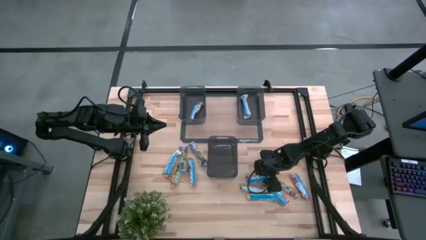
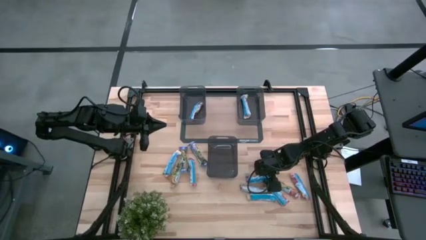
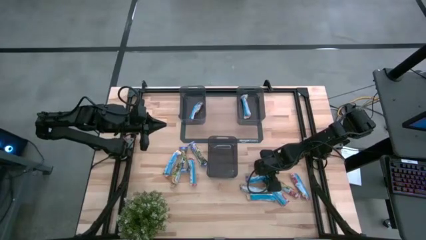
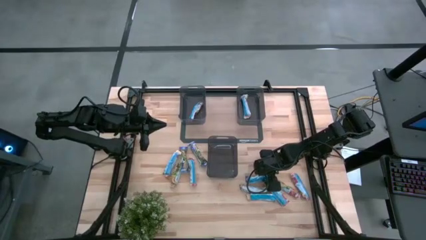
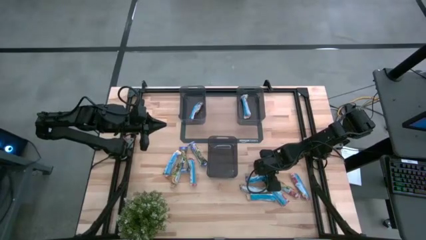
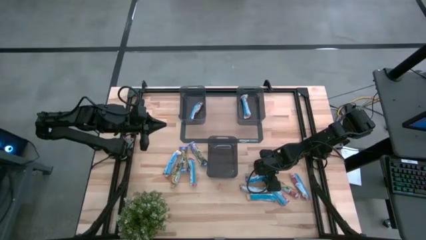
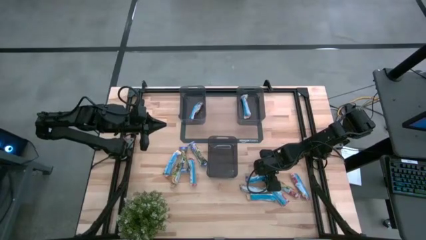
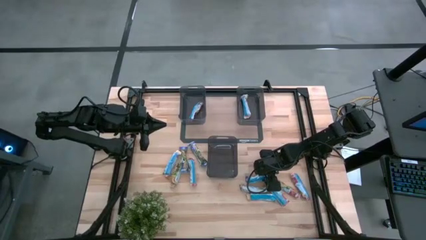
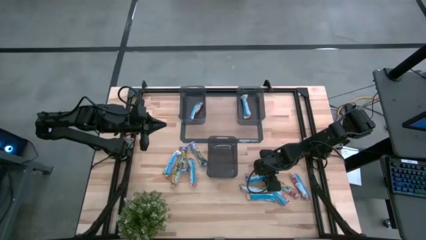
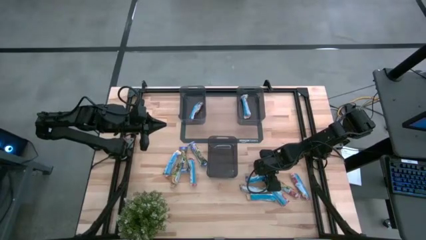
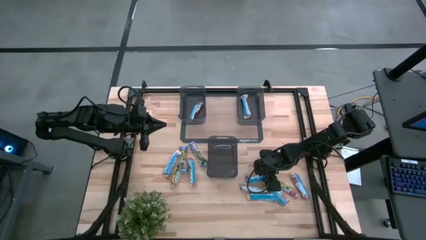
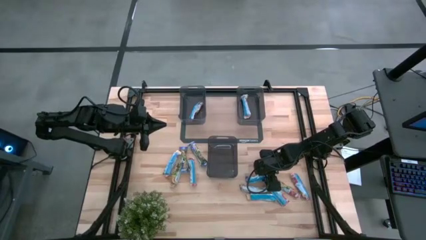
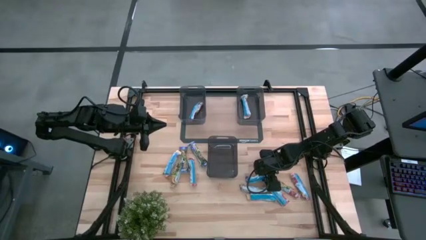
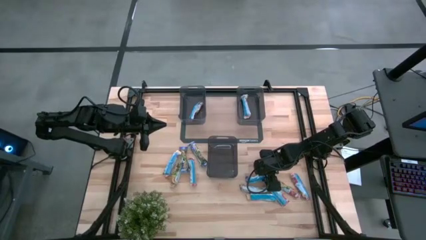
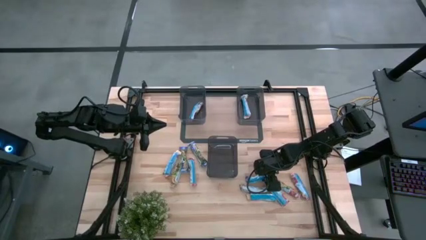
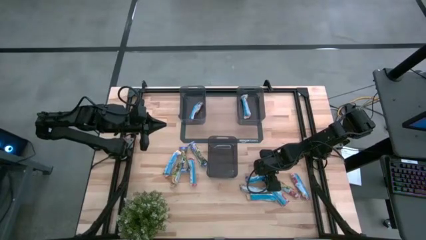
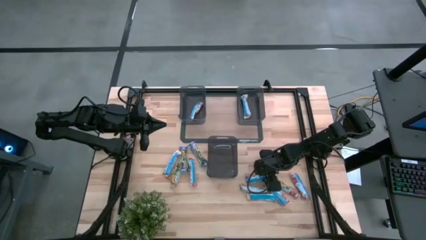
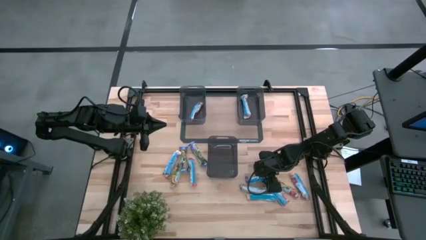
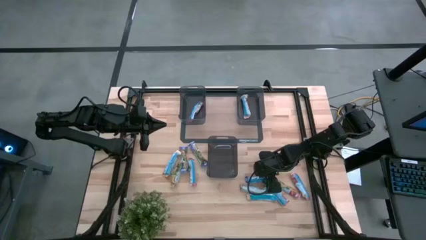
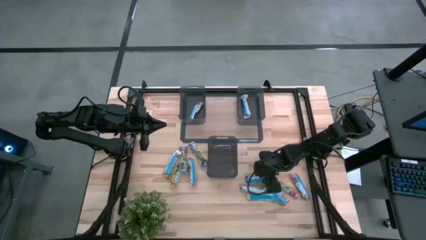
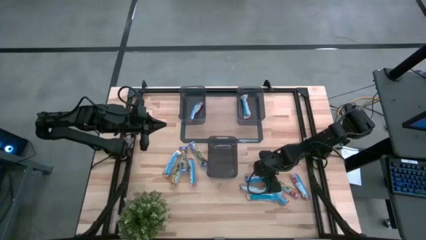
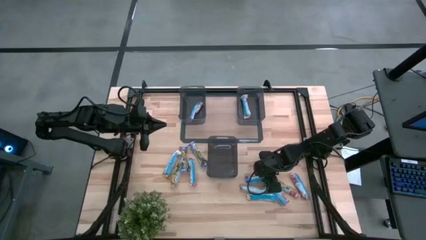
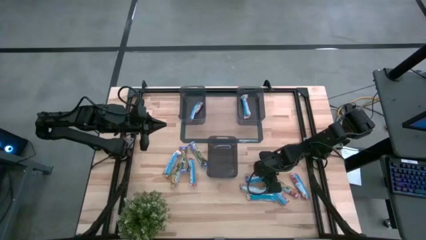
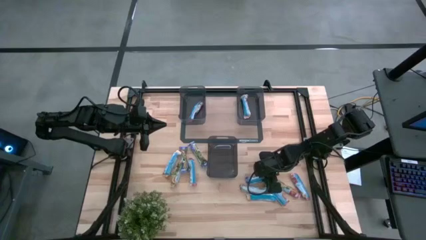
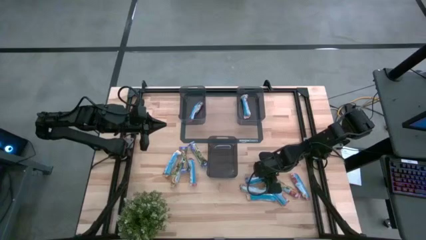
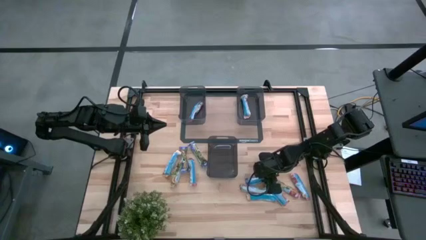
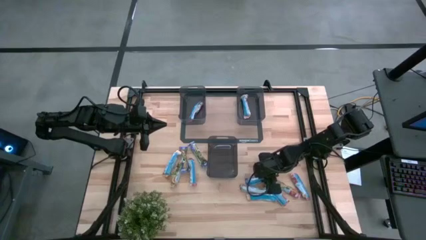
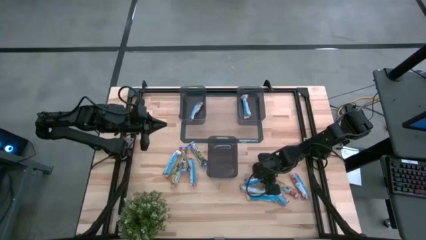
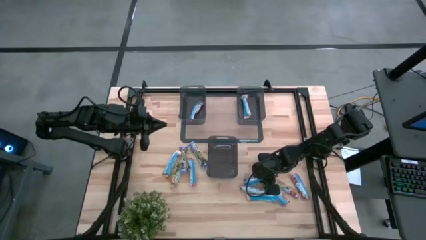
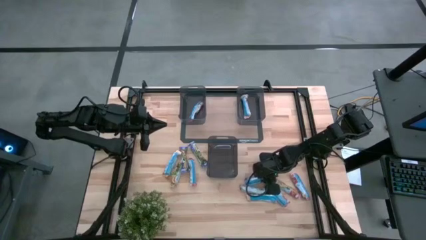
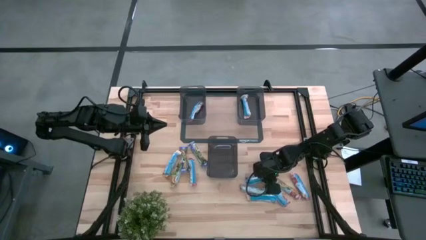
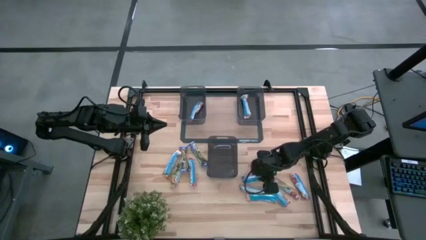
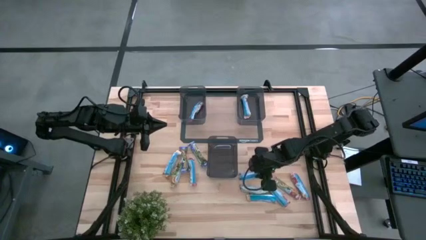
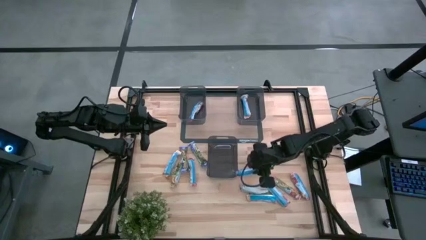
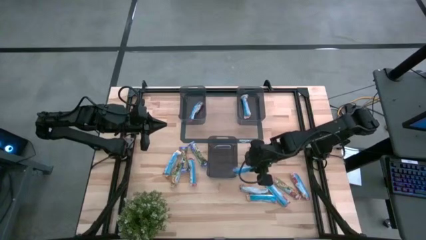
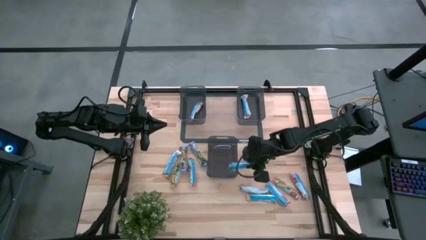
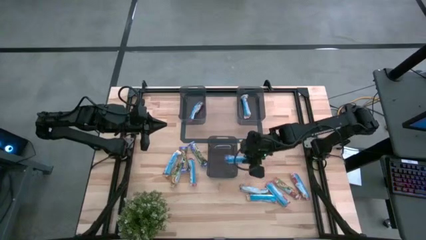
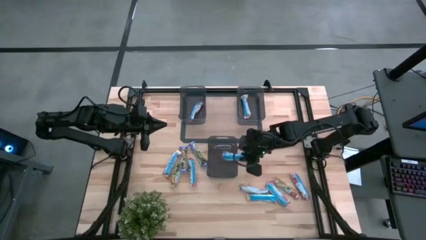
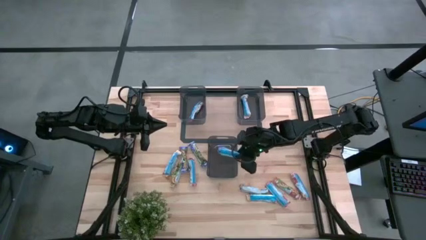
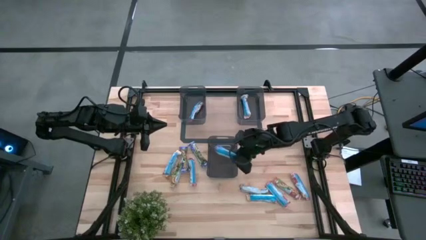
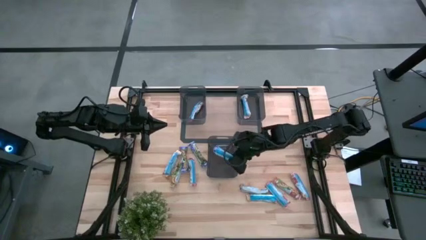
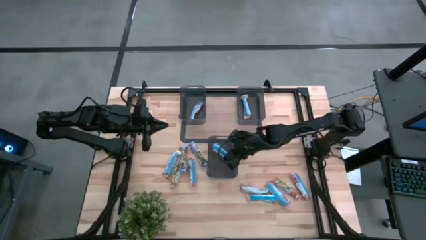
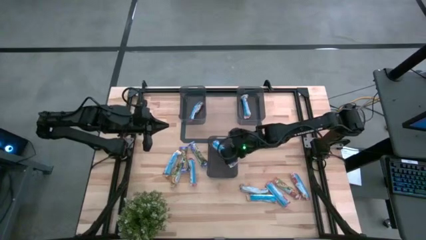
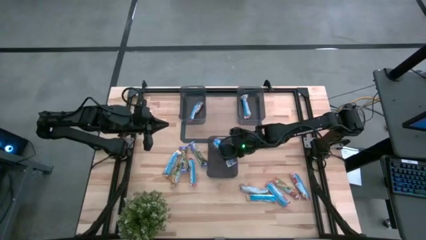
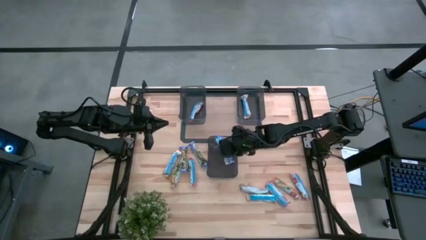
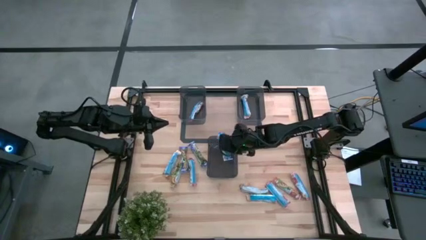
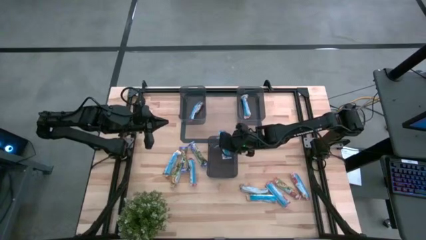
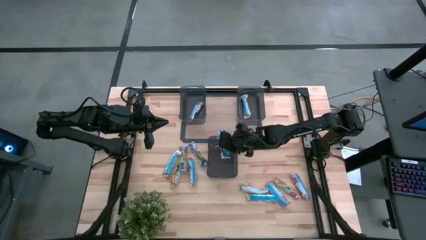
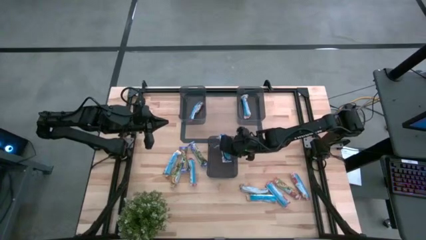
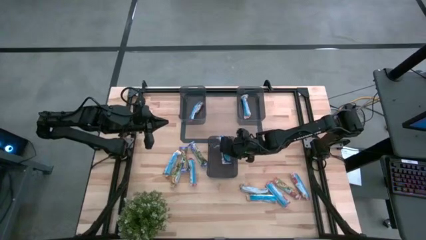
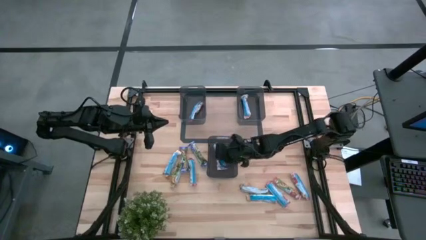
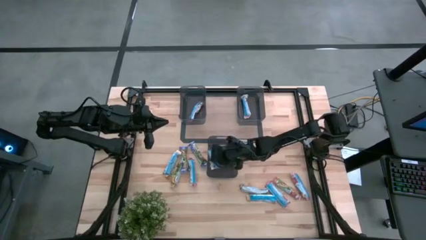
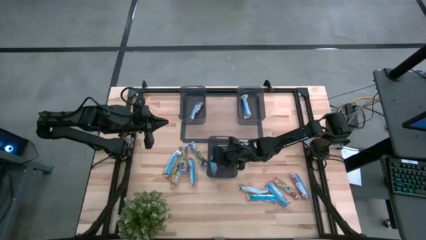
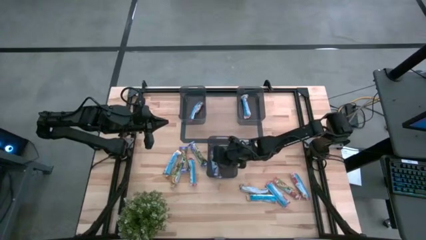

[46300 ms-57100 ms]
Task: Pick and place Granola Bars by type
Put the blue granola bar into the bottom black bin
